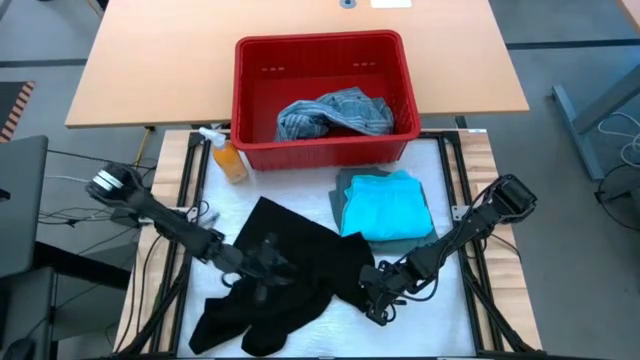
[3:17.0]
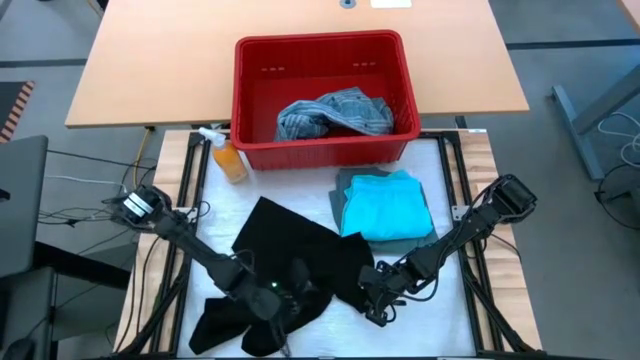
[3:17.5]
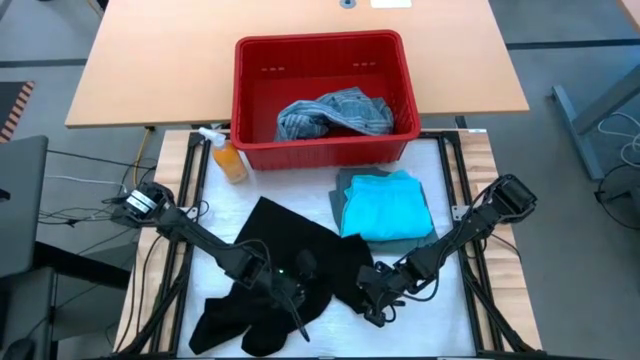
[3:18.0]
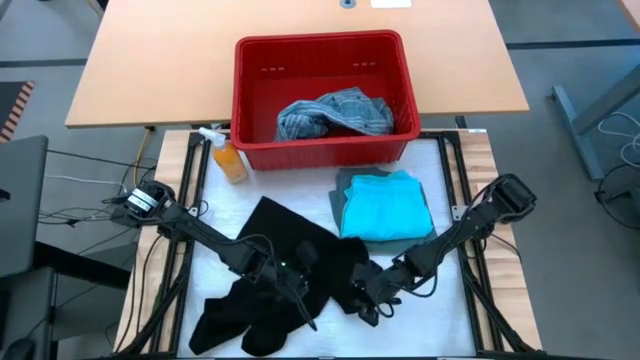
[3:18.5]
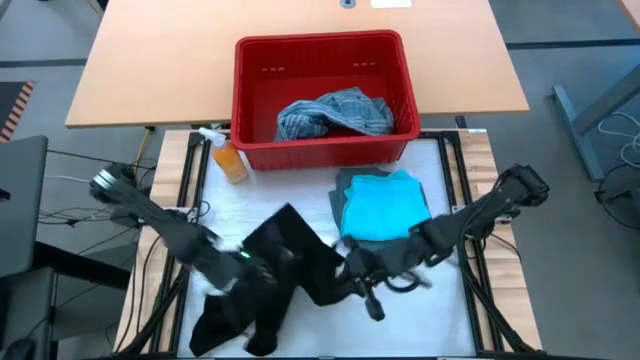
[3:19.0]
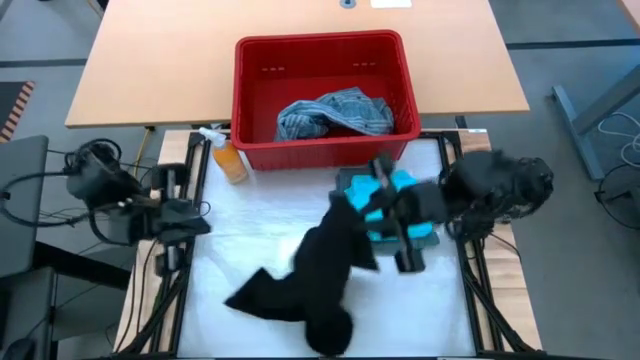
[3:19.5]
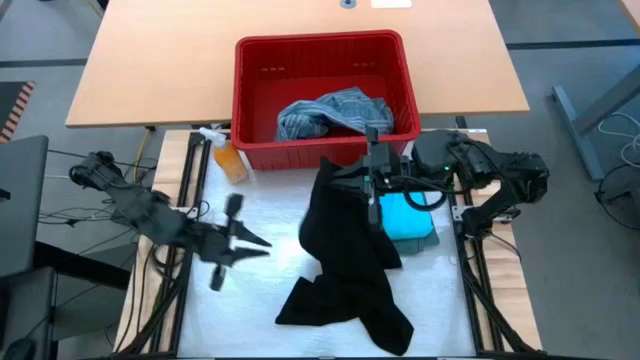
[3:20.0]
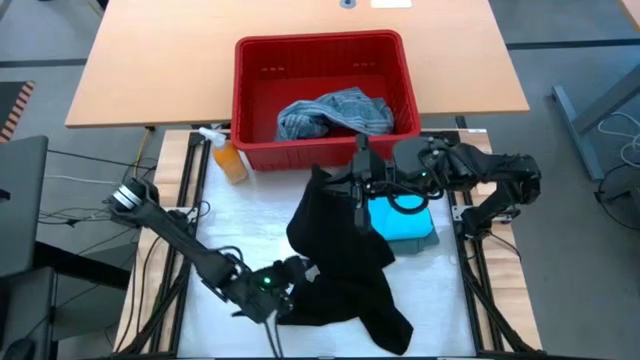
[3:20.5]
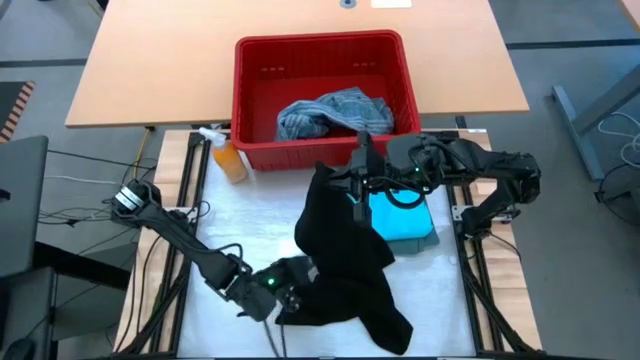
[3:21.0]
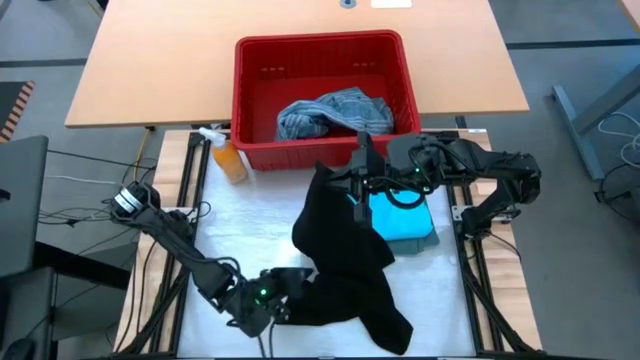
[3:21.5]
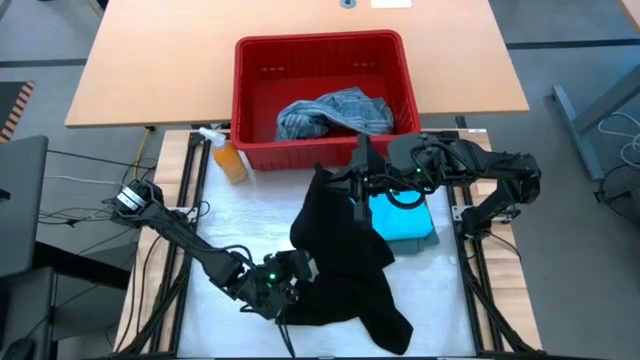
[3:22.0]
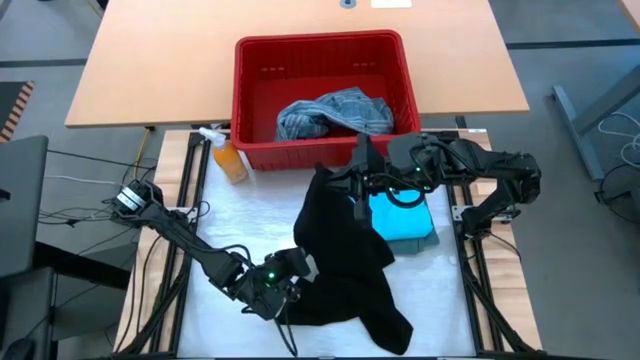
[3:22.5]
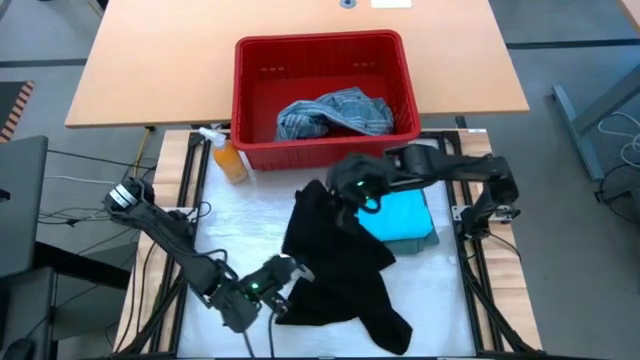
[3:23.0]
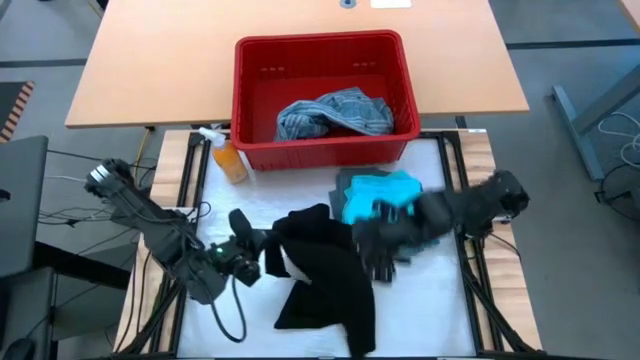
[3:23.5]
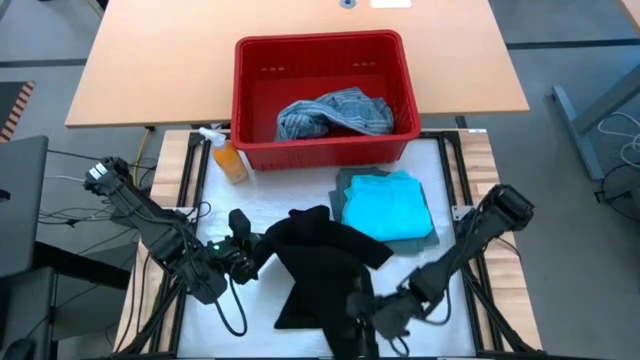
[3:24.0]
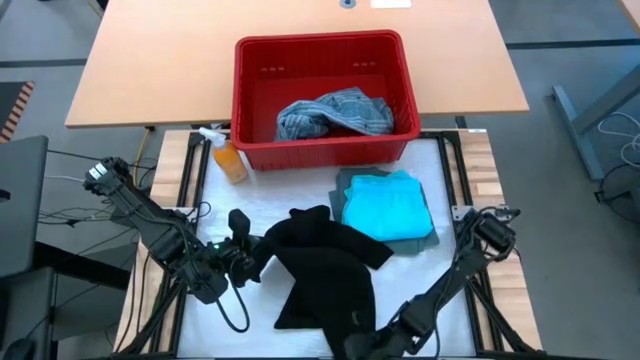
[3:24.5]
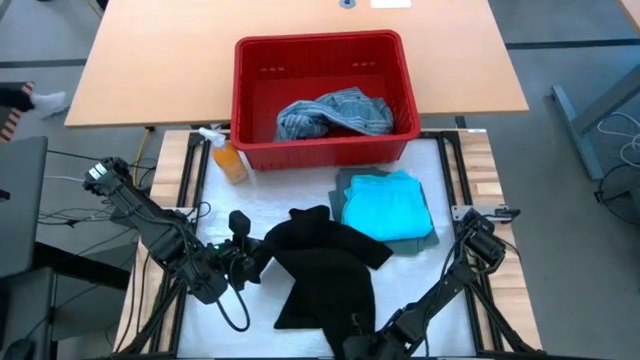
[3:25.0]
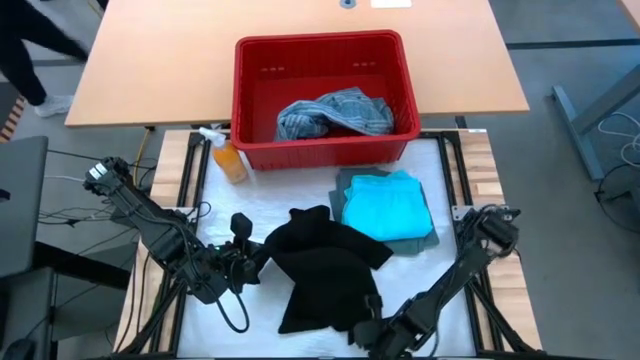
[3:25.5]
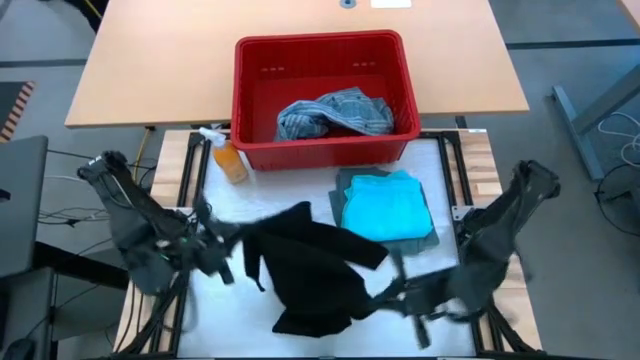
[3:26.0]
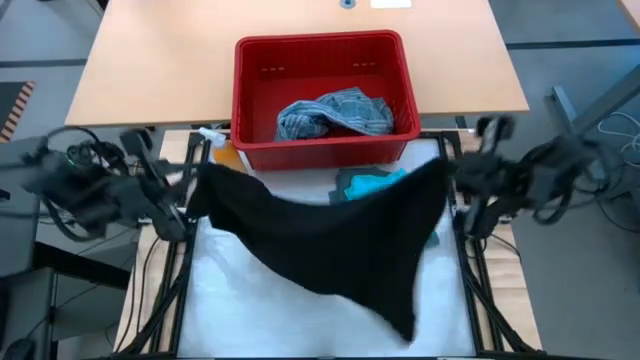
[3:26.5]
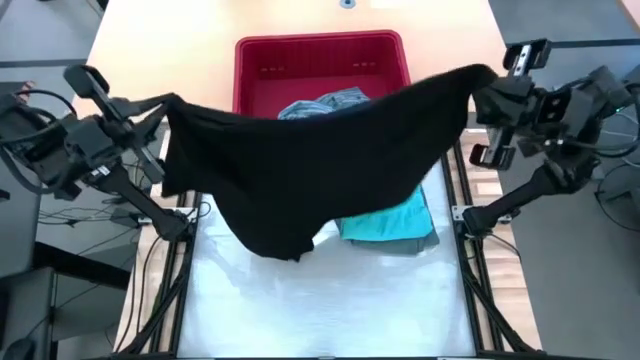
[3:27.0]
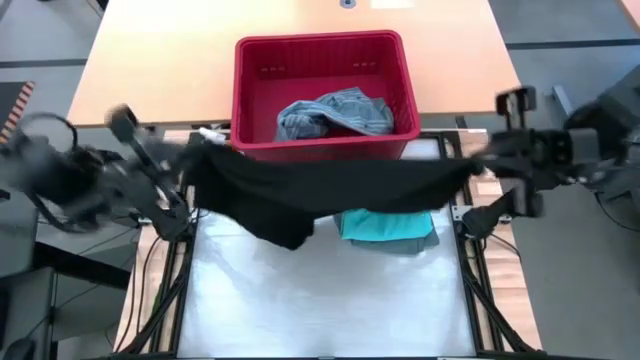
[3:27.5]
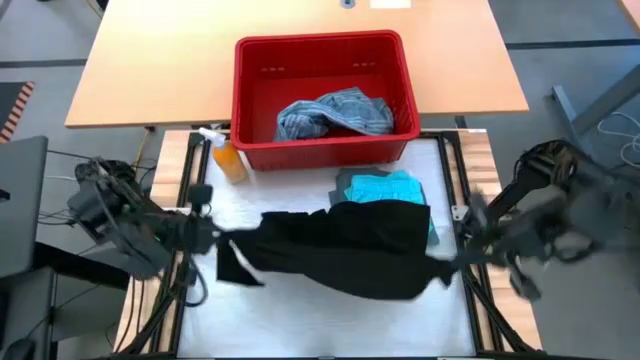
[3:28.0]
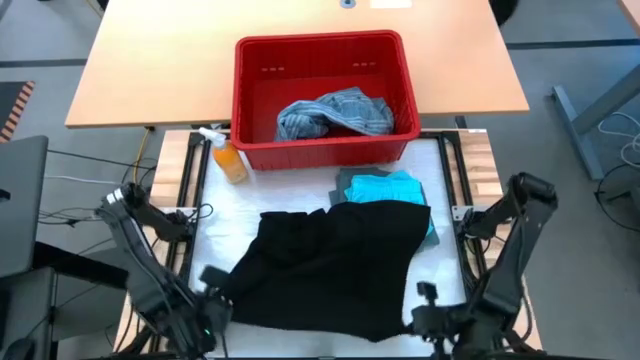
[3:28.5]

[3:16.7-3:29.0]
Task: Fold Laundry from Bin
Fold the black shirt

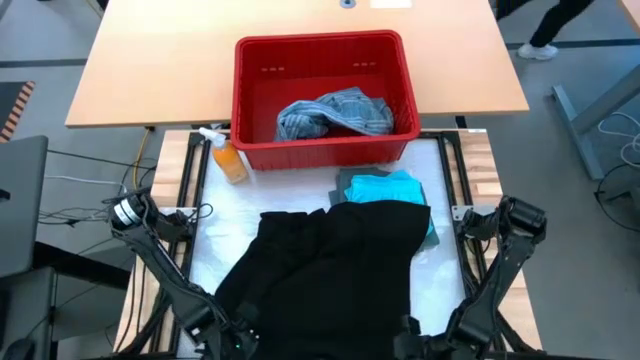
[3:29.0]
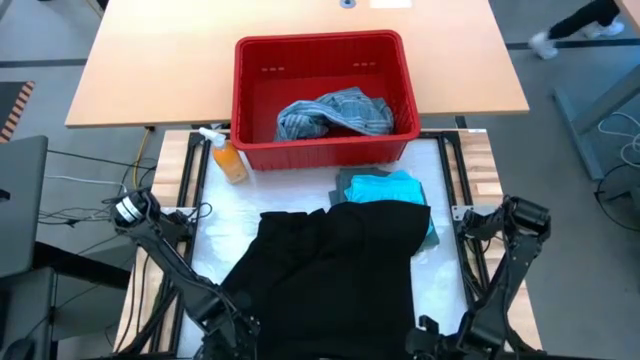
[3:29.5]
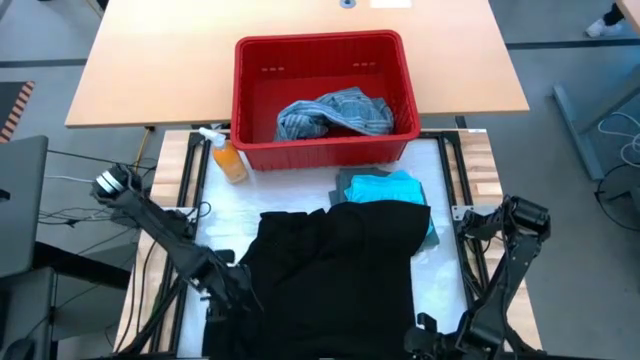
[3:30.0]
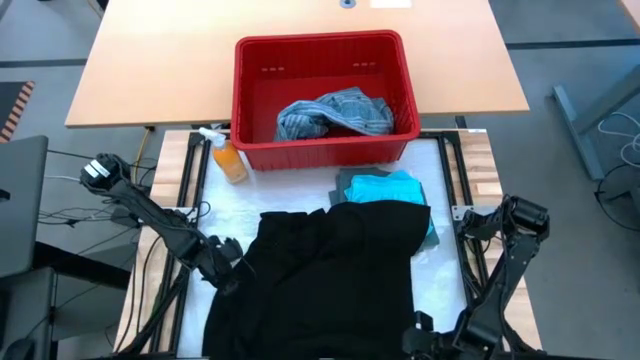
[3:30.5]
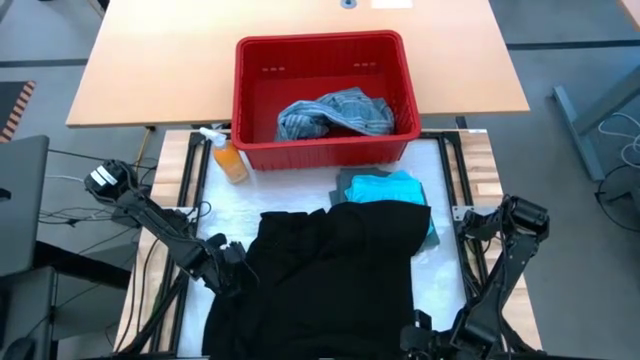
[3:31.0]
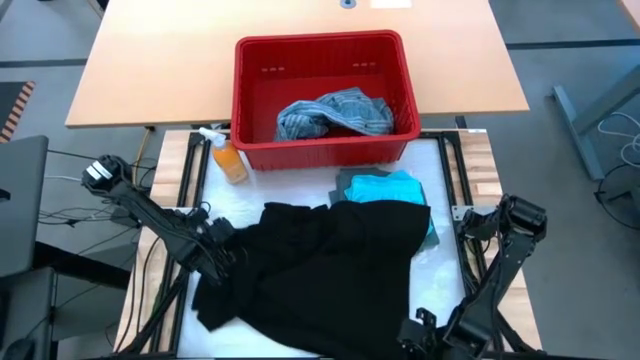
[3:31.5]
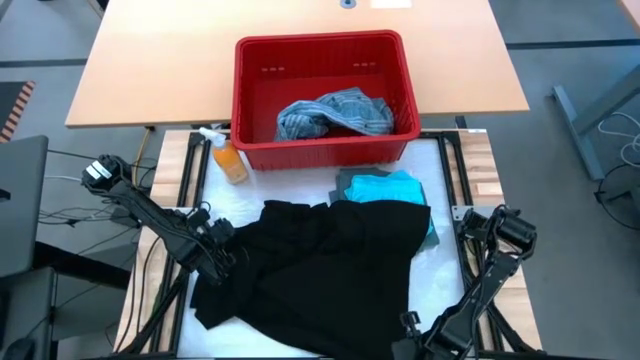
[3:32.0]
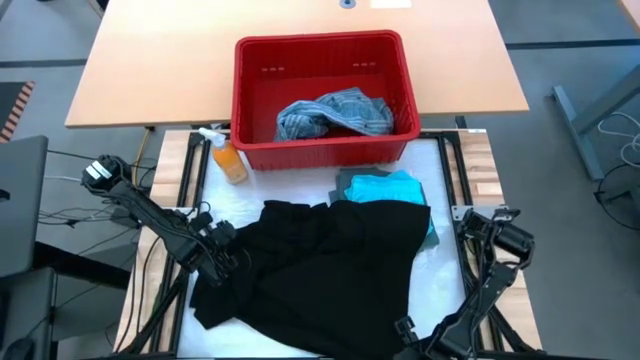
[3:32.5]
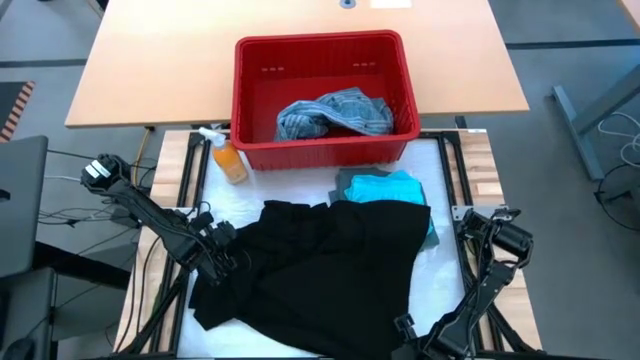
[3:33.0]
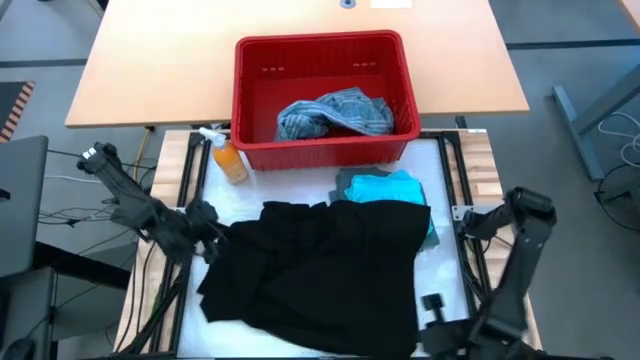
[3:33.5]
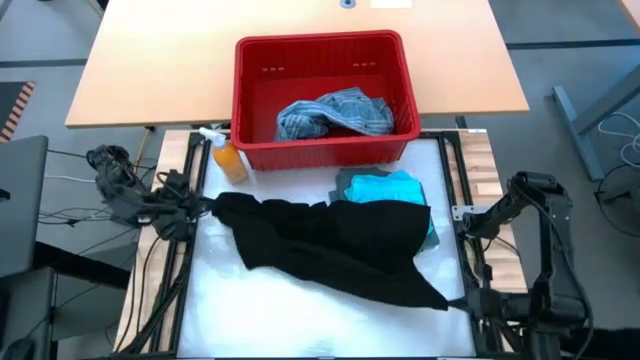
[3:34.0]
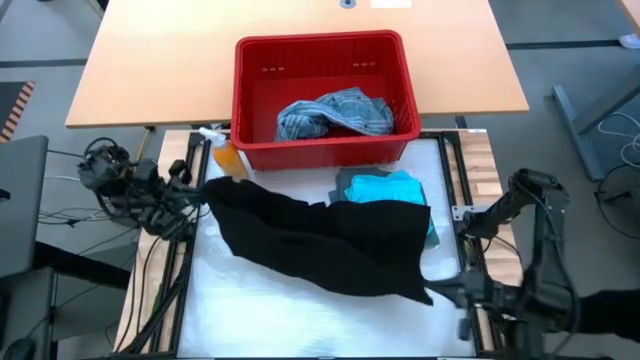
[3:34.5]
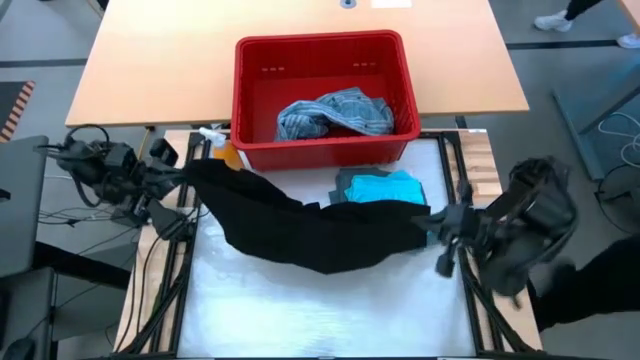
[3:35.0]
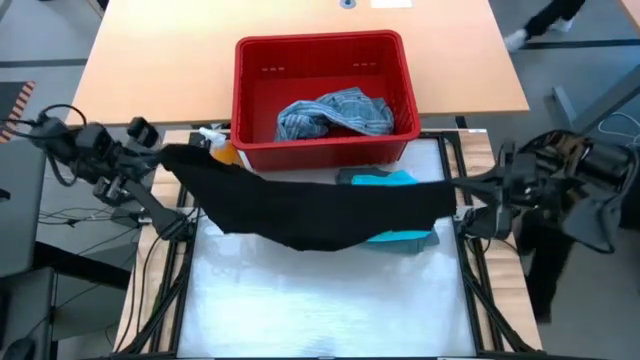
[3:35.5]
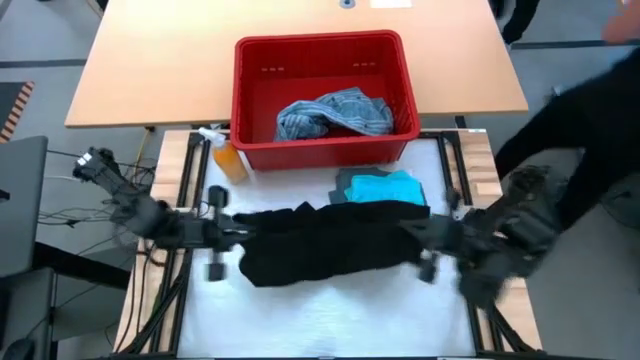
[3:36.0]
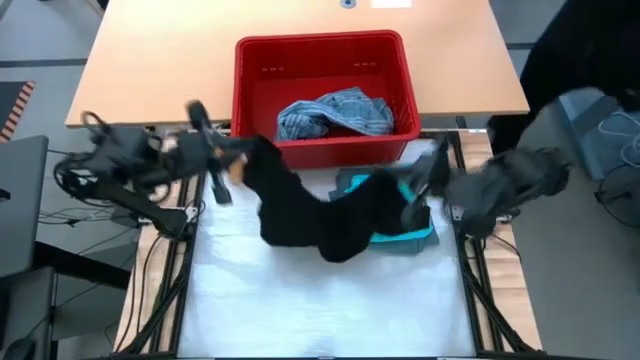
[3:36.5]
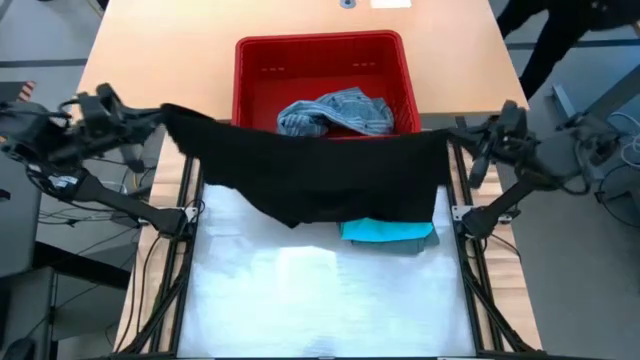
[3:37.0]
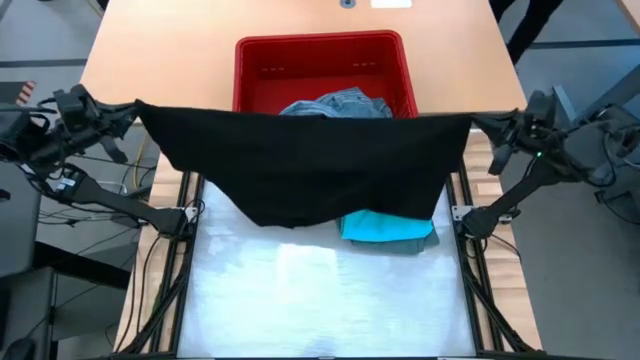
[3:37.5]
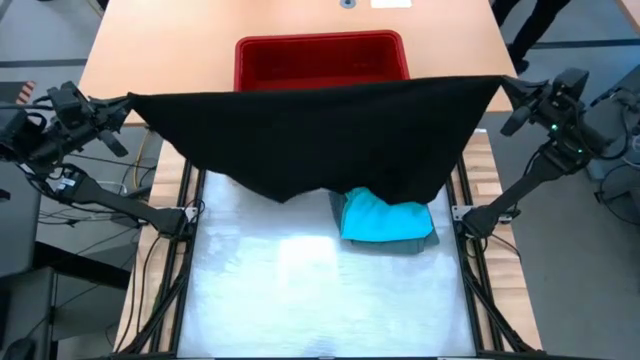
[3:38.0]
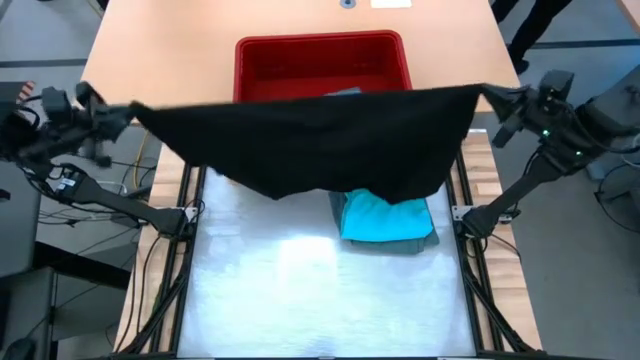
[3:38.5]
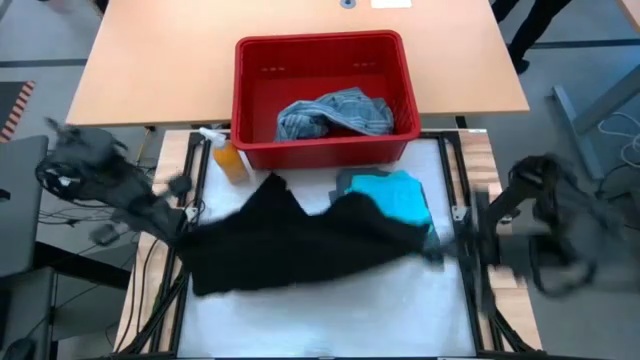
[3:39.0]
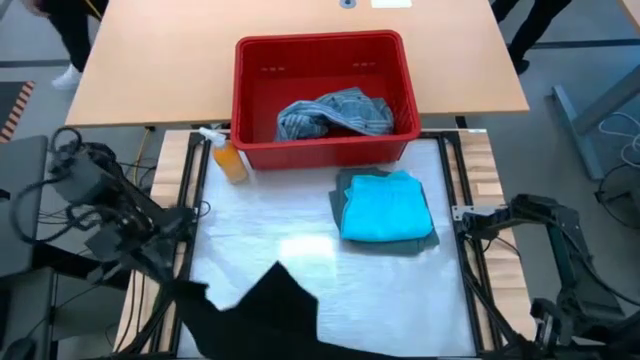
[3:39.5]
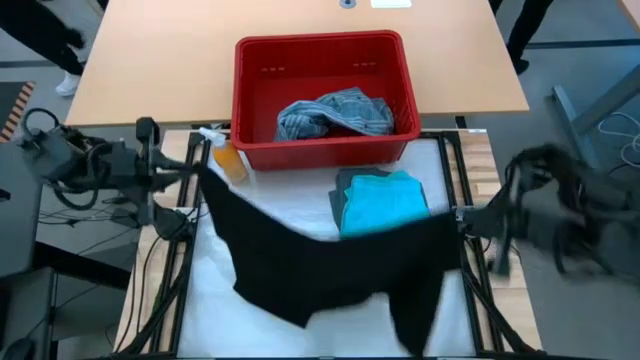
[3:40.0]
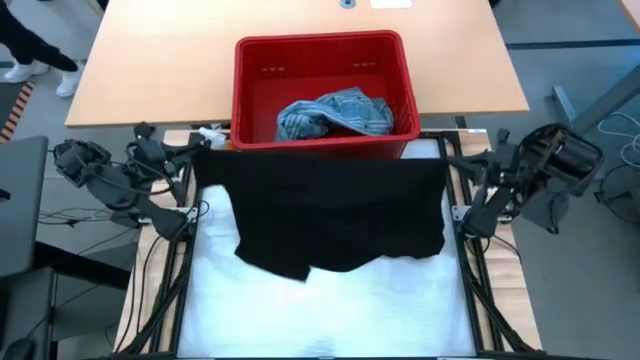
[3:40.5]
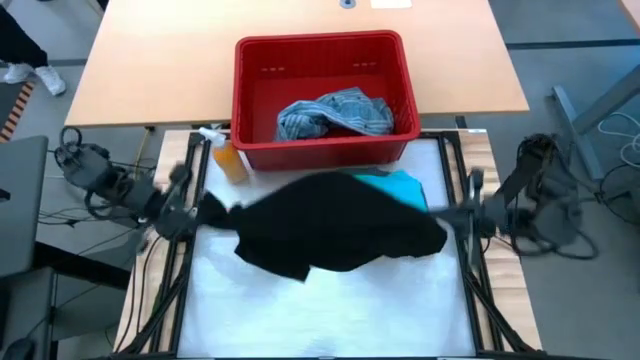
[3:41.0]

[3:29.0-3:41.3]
Fold the black shirt
